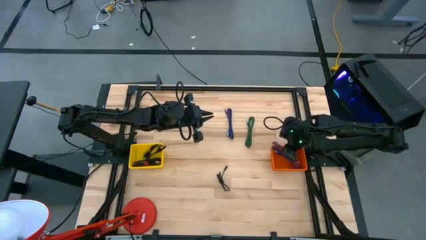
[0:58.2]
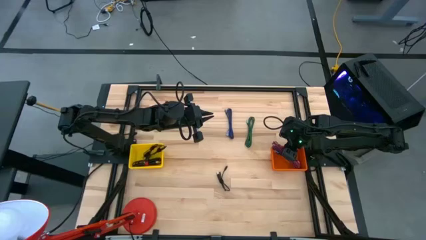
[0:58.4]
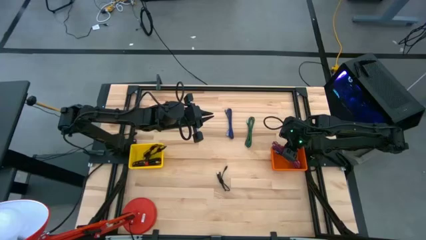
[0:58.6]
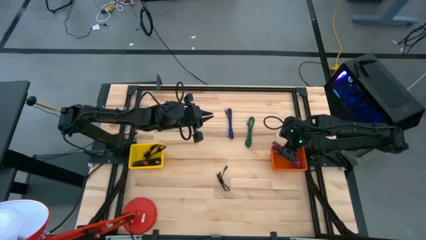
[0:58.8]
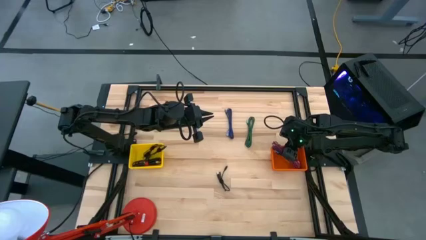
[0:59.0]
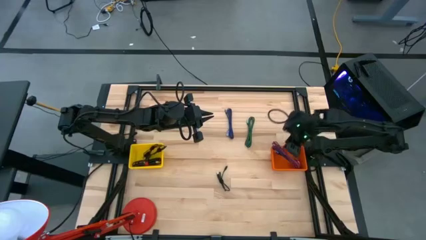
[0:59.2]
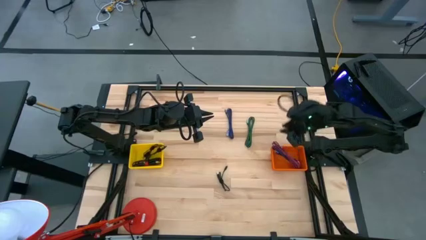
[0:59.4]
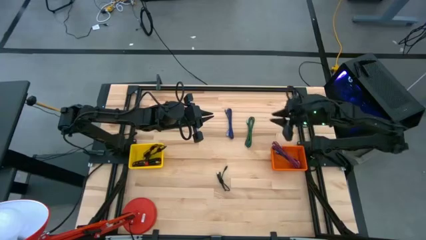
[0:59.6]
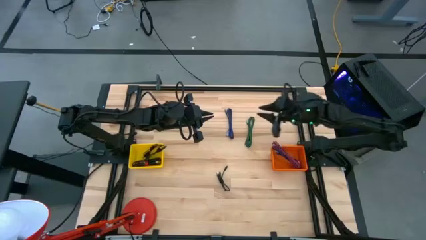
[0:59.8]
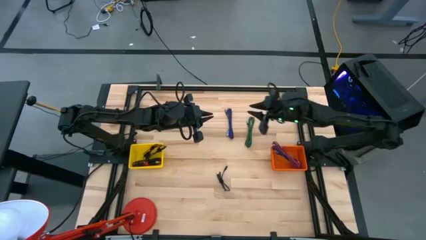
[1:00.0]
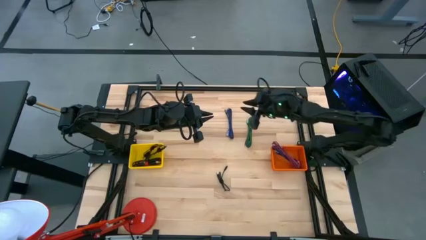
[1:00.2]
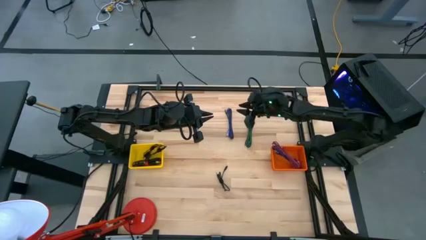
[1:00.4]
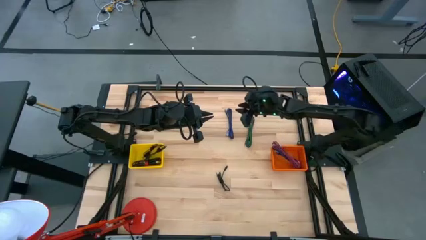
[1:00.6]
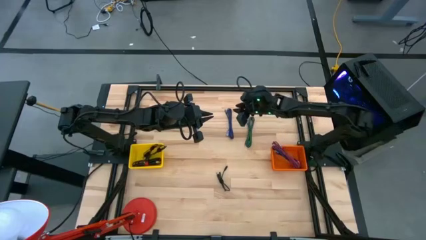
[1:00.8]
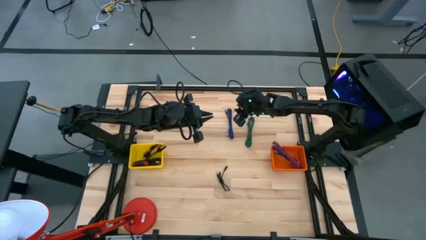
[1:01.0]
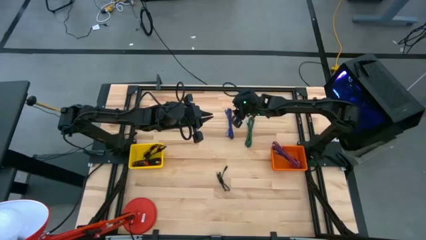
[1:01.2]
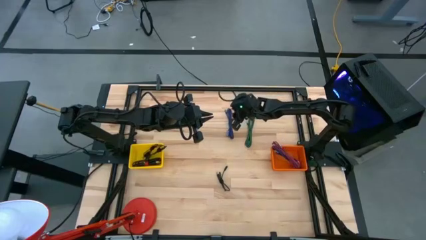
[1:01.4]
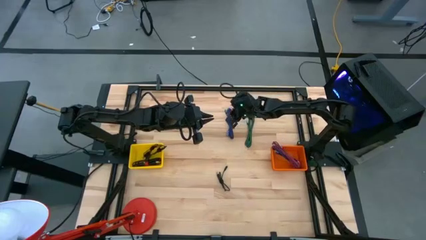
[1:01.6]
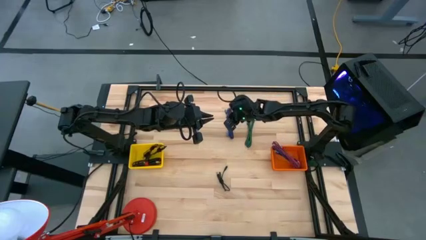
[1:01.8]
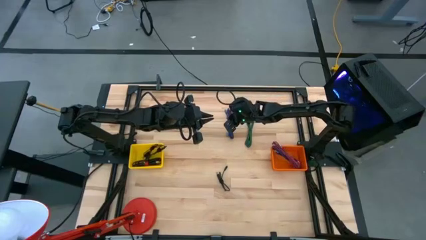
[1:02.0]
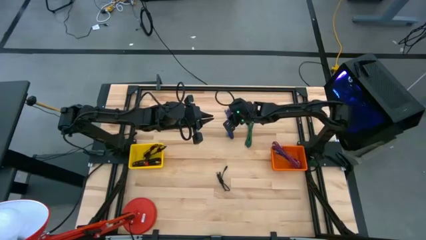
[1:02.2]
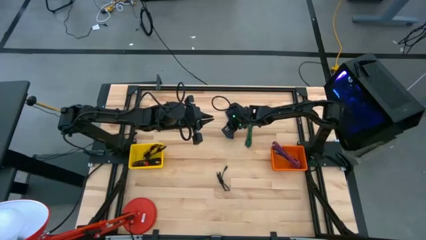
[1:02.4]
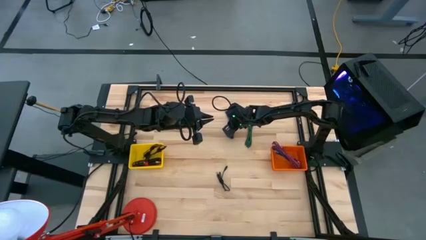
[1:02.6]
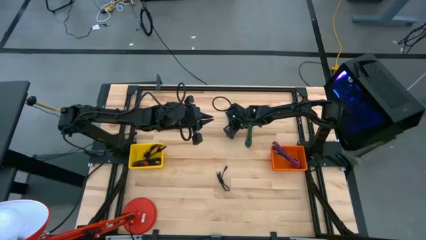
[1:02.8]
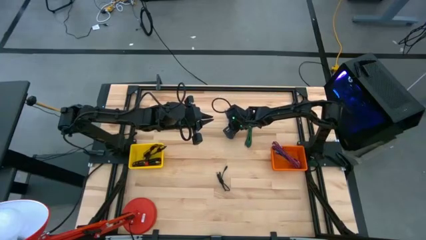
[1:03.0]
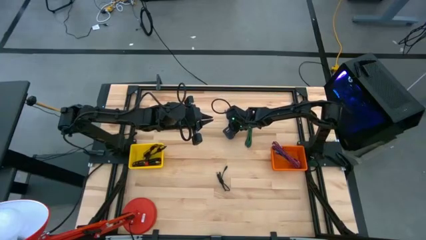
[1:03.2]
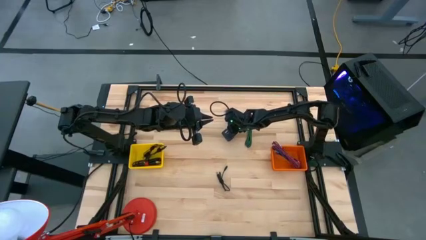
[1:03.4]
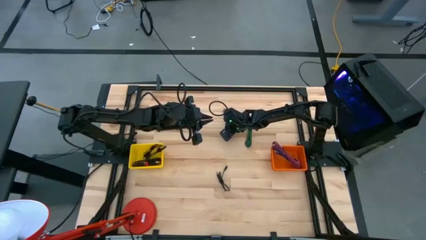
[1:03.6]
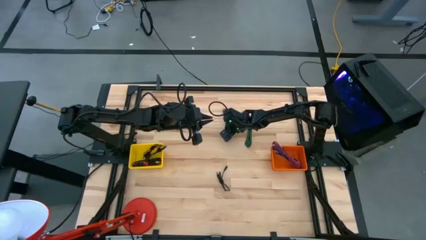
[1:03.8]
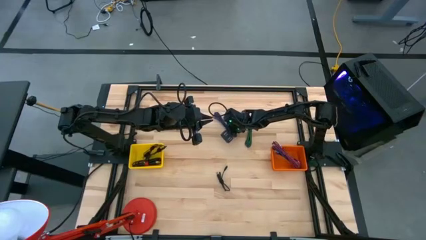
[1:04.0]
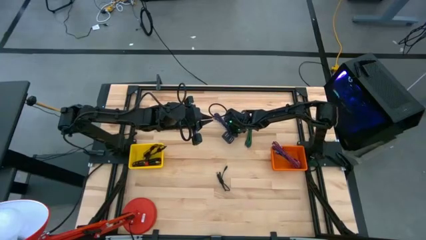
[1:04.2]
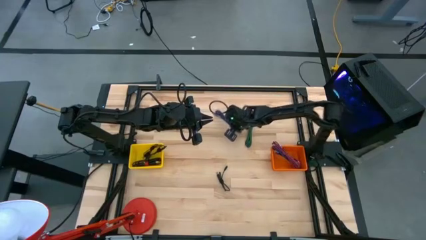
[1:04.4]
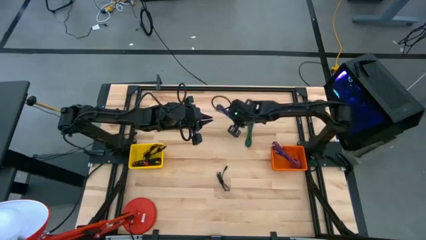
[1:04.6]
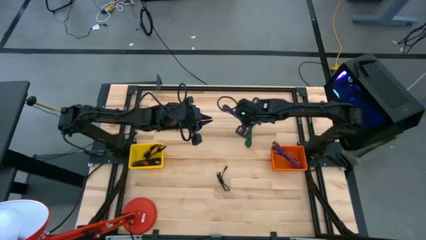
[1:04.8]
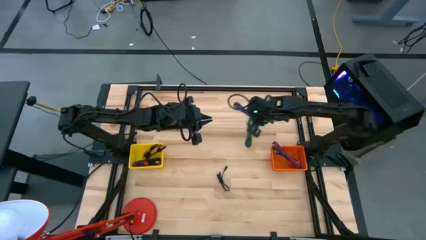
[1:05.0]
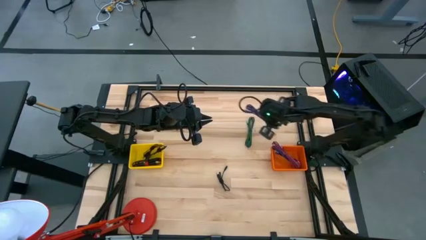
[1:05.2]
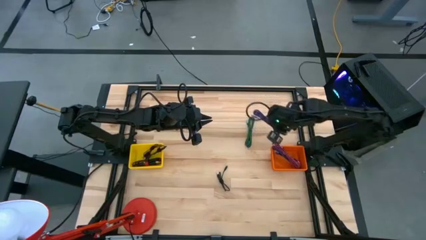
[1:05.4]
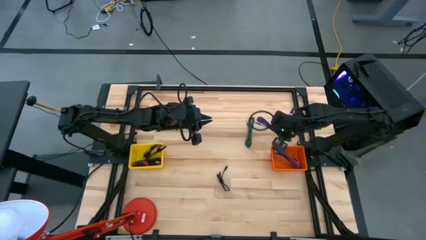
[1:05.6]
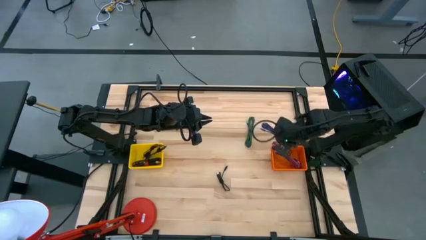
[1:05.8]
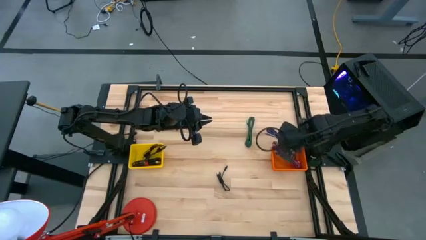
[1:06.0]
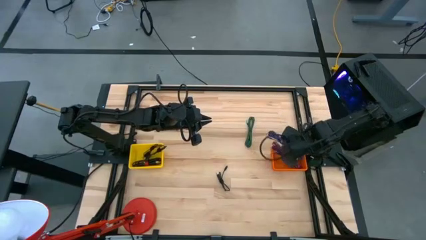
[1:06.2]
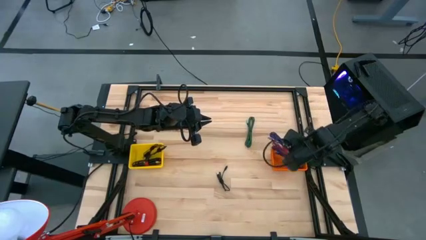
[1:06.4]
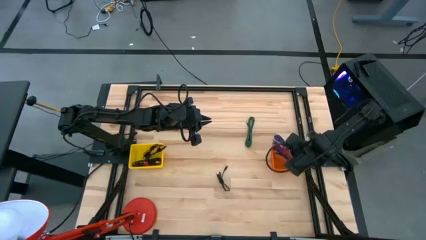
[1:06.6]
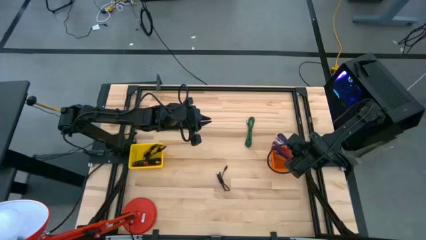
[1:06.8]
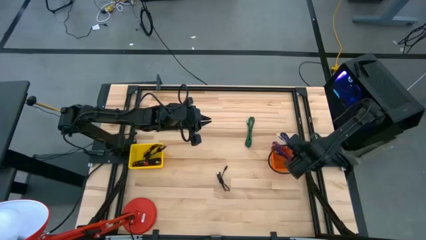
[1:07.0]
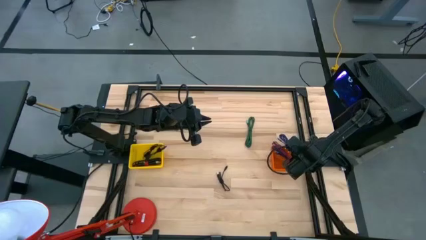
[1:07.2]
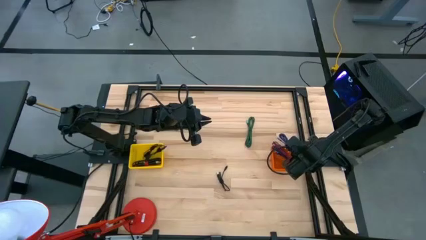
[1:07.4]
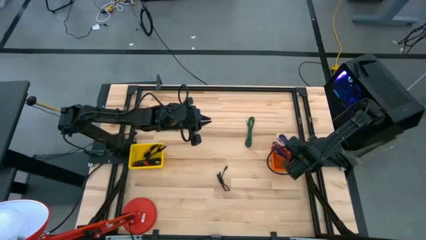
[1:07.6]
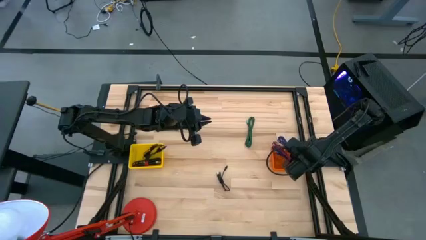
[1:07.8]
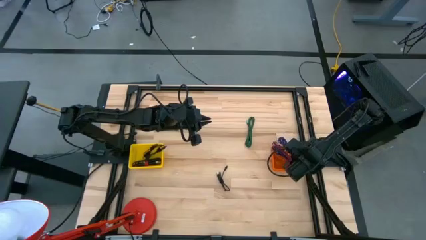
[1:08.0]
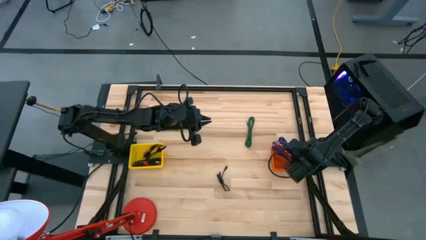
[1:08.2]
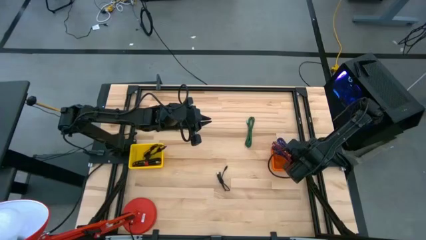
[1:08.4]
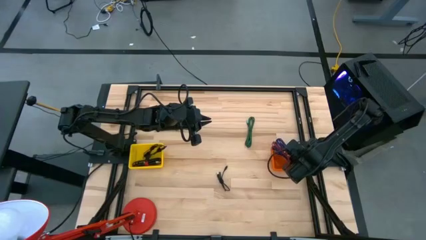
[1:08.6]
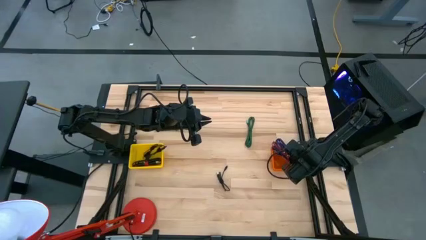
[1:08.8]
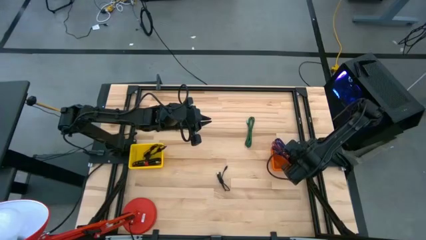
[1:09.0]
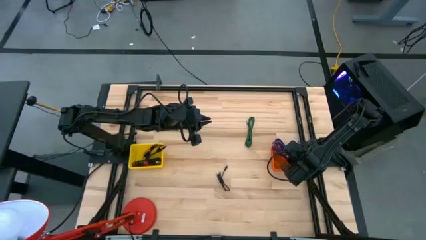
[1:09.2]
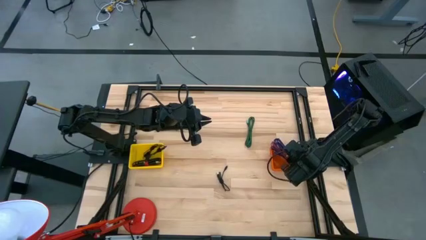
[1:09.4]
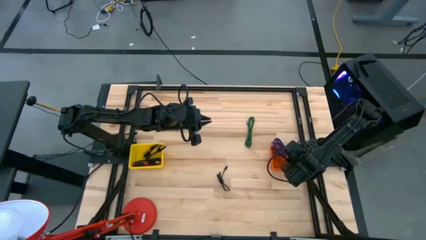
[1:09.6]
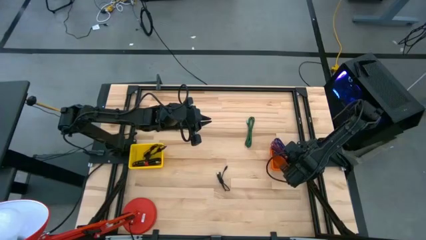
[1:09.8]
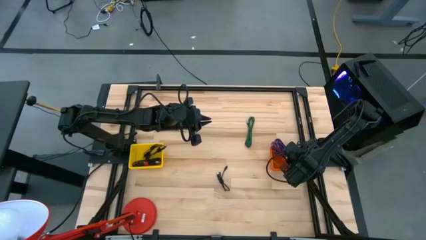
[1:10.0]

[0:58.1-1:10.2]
Task: Pick & Place USB Port
Put the blue USB cable into the orange bin

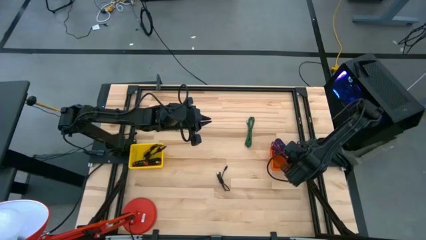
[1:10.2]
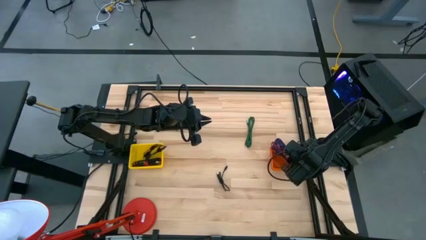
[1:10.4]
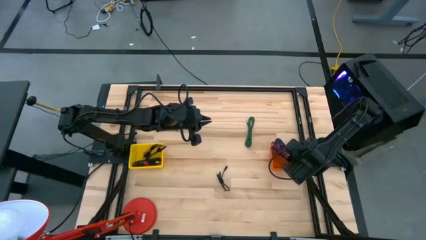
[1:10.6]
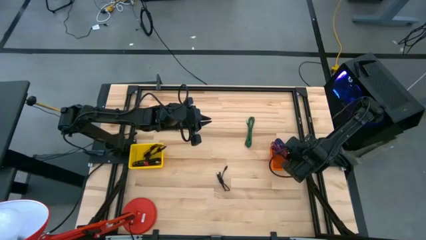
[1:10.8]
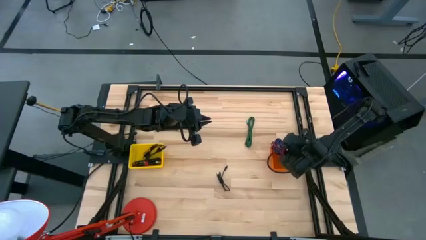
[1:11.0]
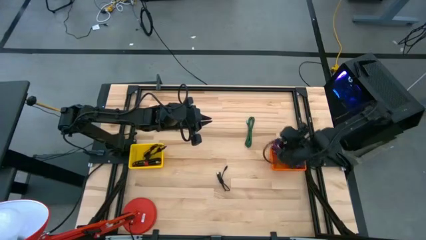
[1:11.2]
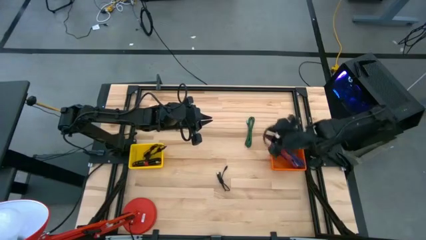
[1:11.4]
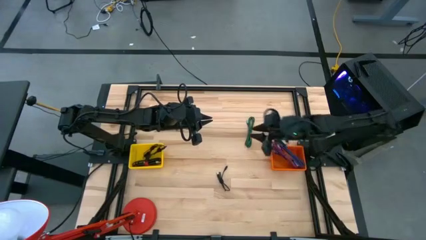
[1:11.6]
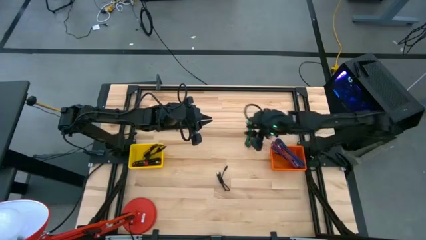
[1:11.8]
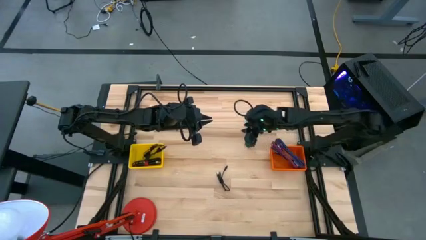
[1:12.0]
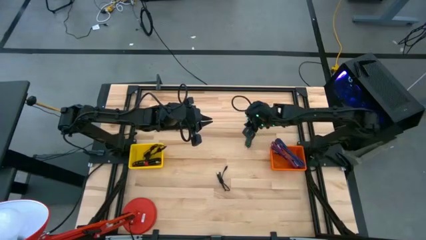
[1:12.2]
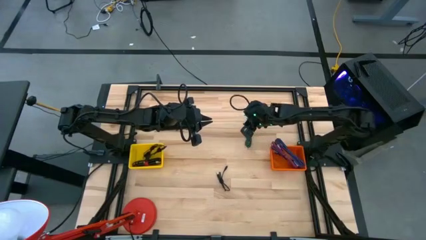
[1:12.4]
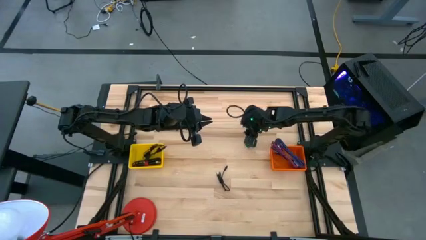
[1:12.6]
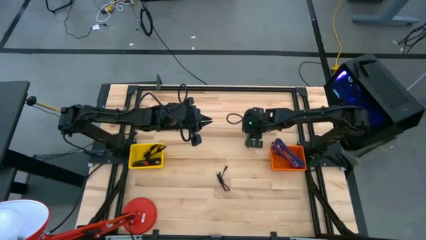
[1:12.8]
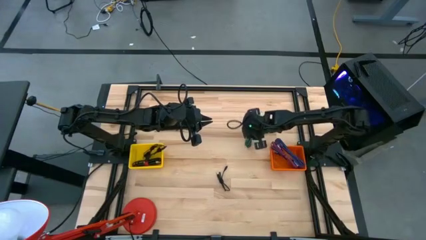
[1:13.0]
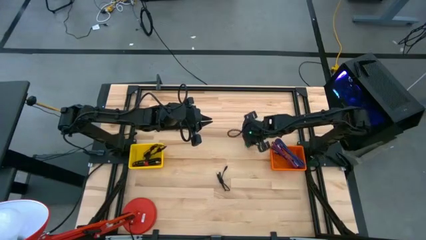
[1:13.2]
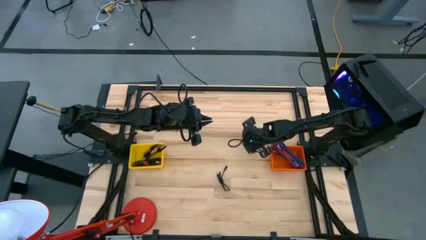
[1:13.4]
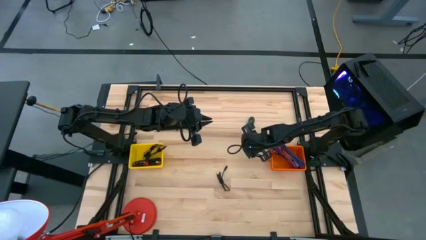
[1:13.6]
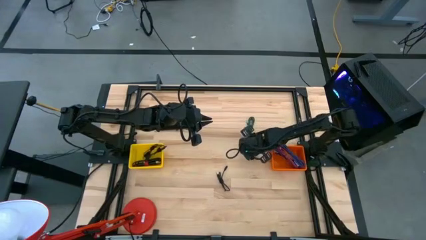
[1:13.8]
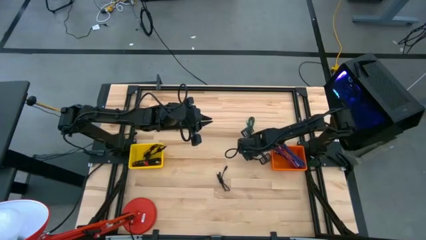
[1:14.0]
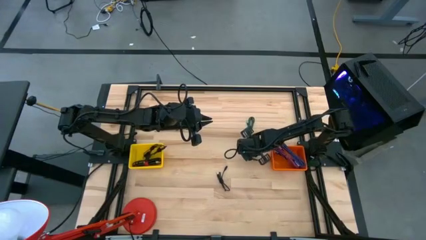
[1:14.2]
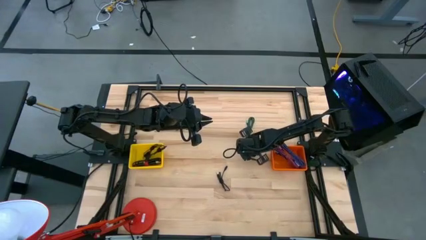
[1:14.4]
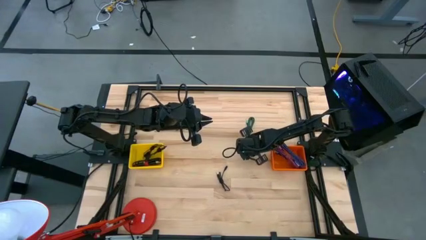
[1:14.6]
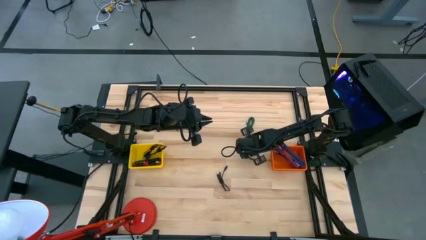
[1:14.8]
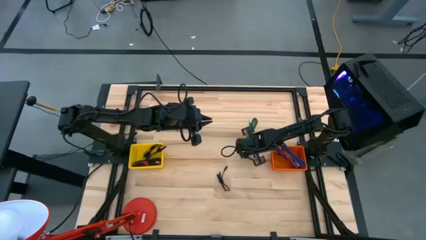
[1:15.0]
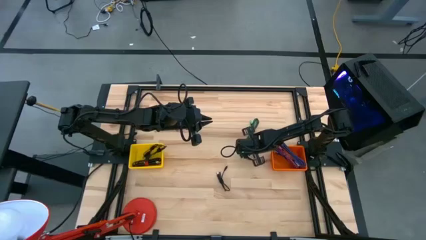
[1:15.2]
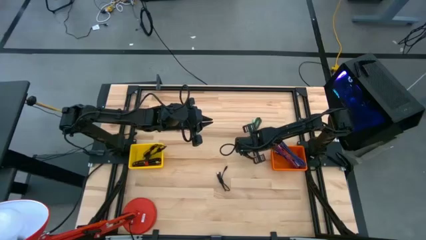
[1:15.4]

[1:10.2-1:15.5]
Put the green USB cable into the orange bin
